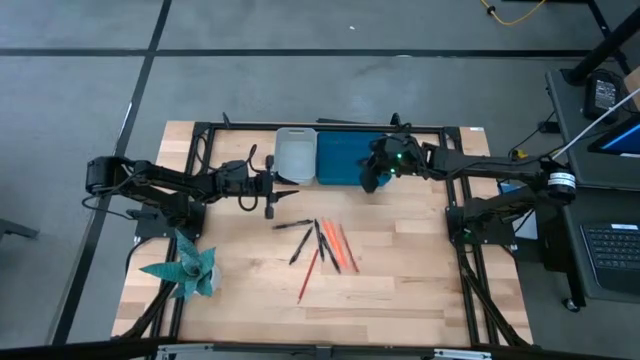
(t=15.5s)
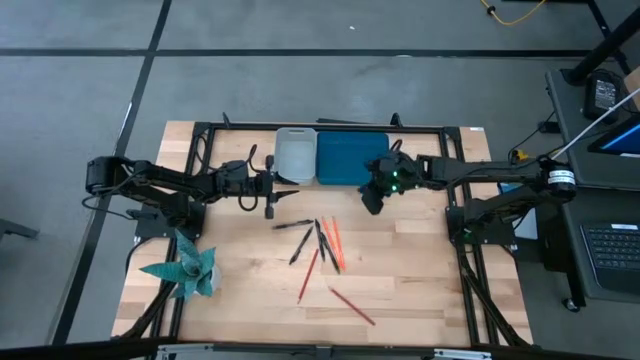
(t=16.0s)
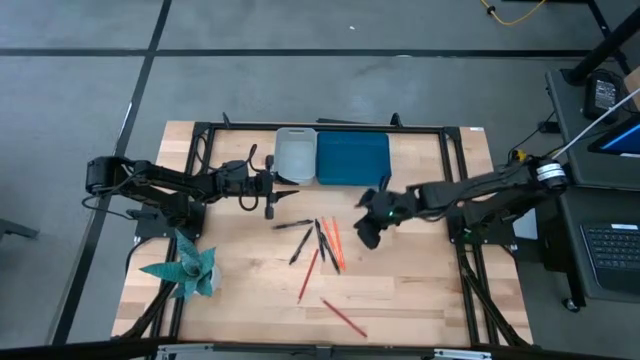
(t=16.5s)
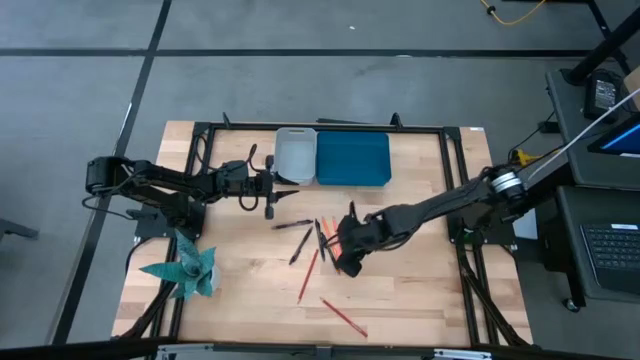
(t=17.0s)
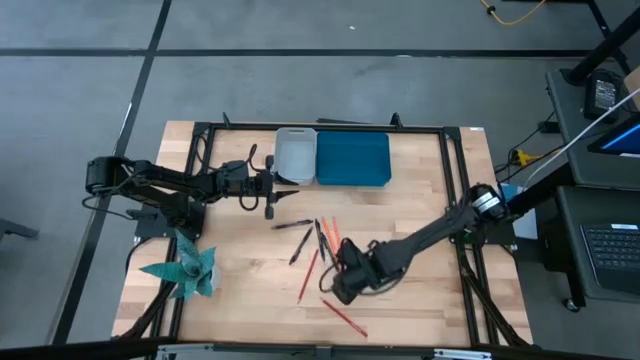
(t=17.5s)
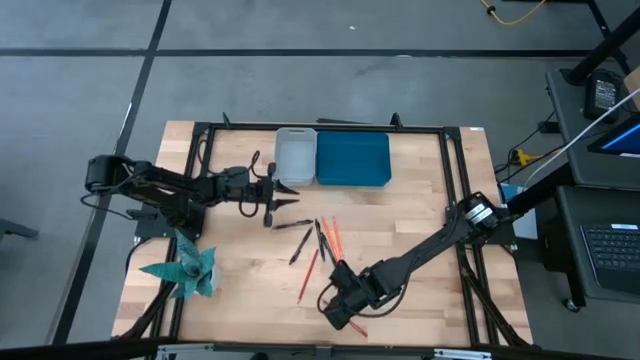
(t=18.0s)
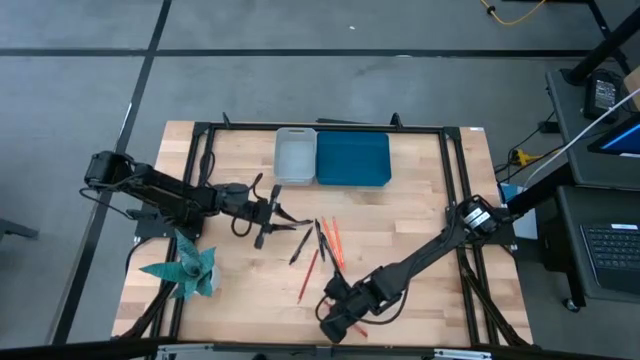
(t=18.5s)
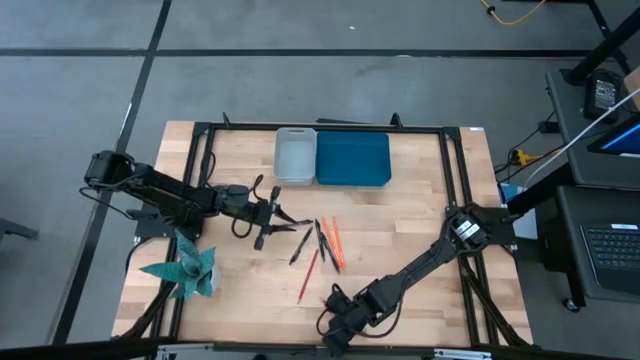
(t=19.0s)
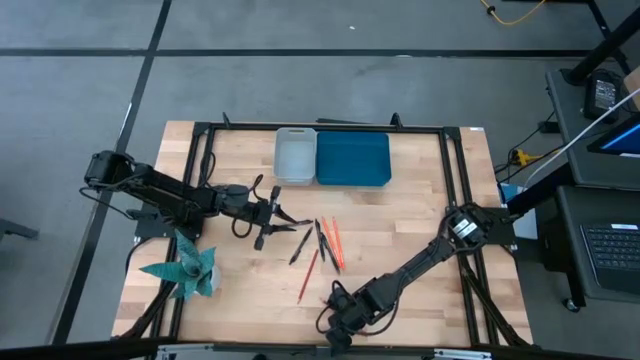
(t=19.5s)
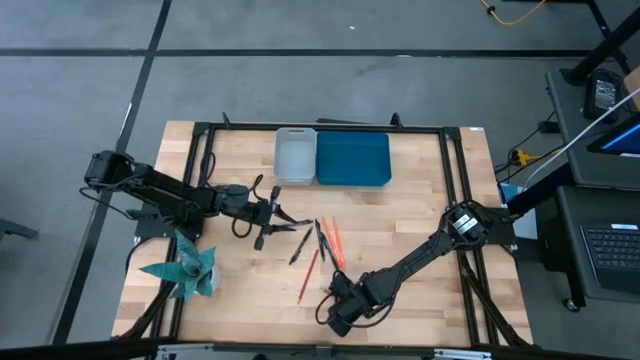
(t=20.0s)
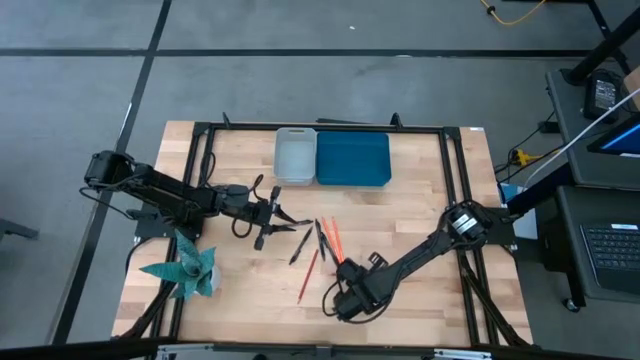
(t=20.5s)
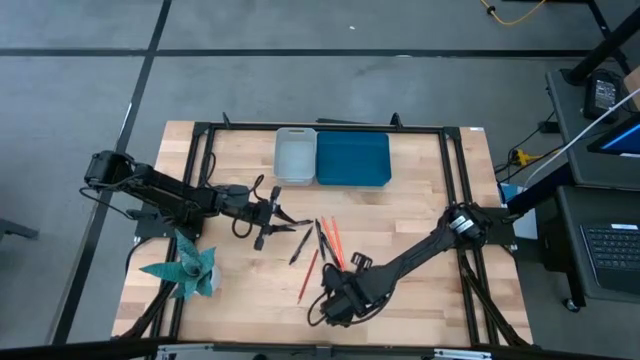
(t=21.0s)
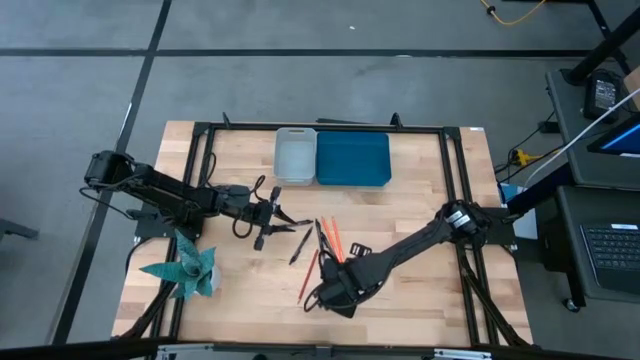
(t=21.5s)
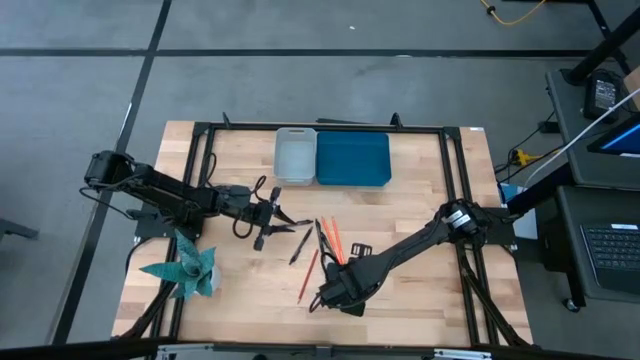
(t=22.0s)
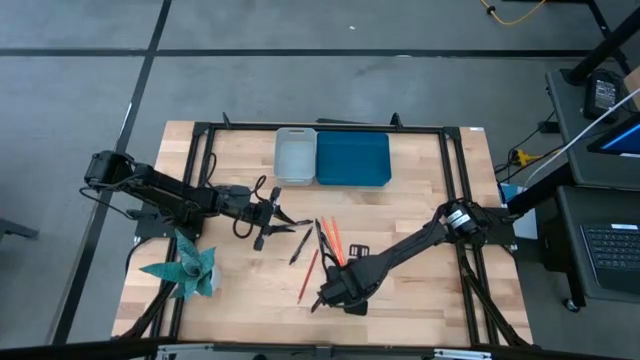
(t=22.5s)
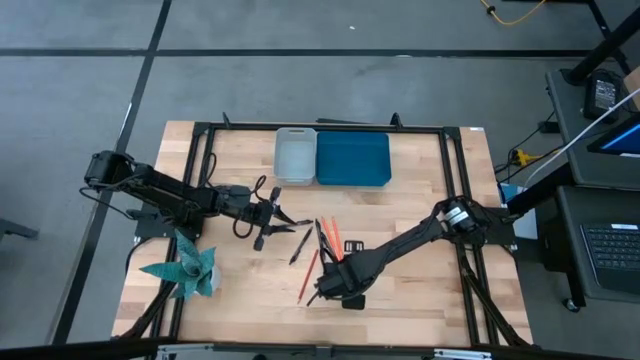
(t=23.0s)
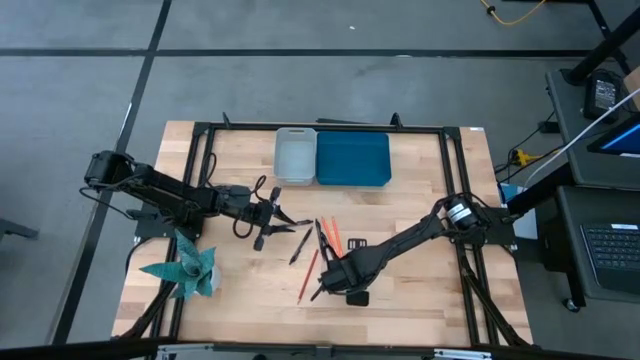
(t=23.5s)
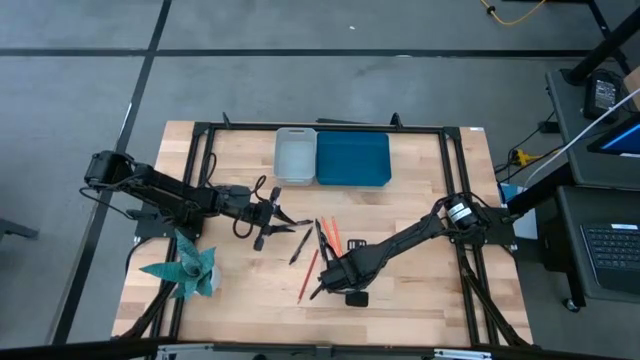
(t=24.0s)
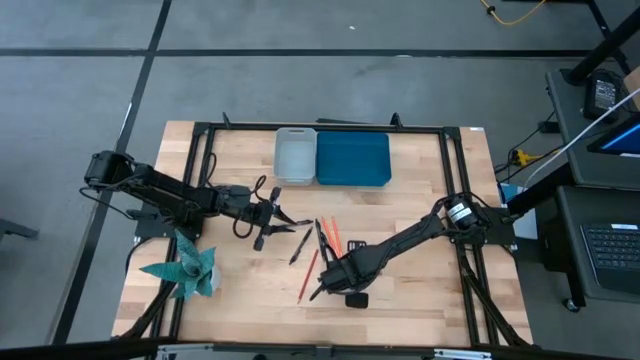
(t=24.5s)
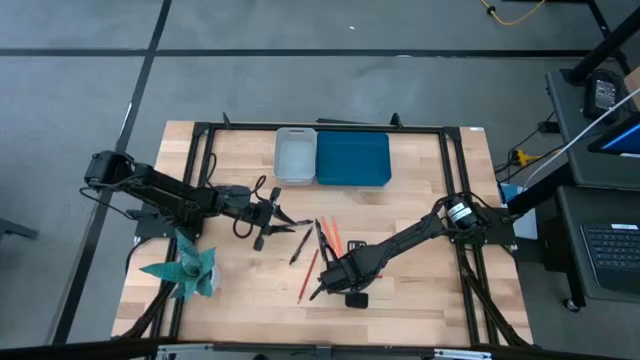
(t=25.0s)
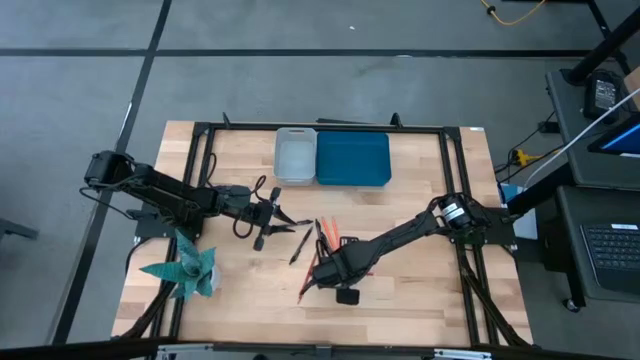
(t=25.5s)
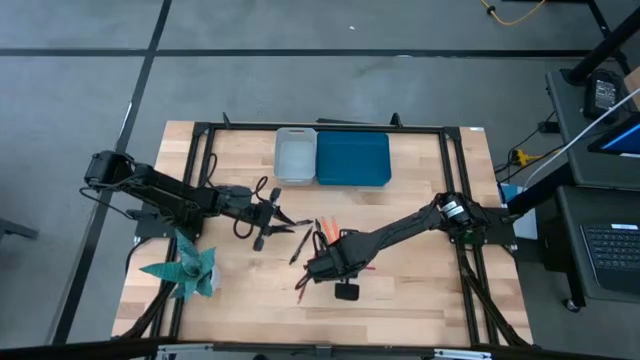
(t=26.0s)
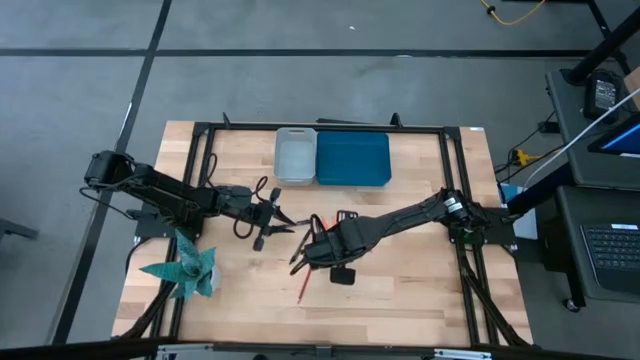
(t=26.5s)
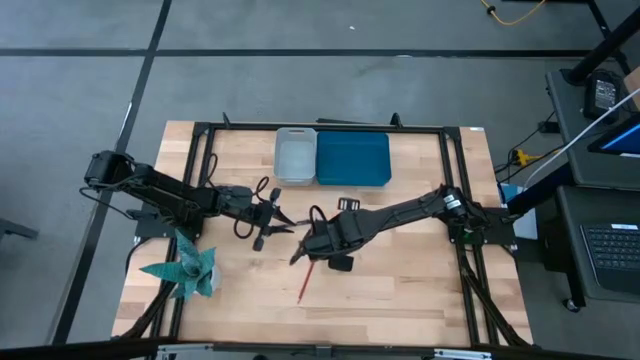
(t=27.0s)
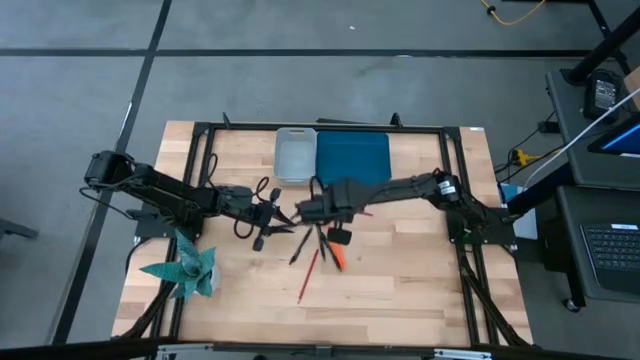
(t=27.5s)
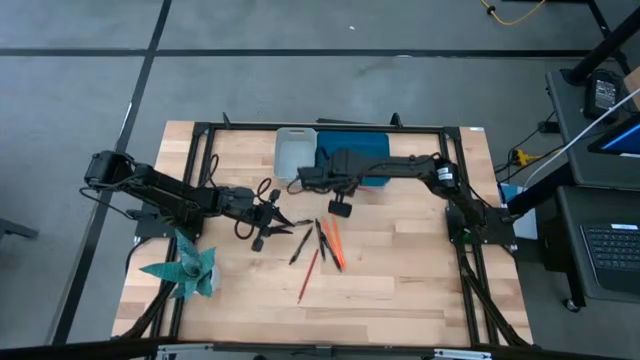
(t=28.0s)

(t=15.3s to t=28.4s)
Task: Sort pens & pencils
Put the top red pencil into the blue bin

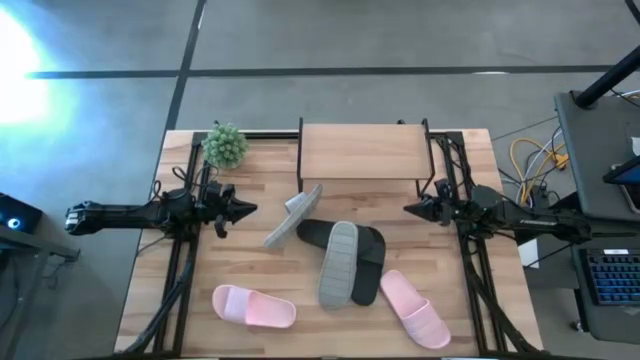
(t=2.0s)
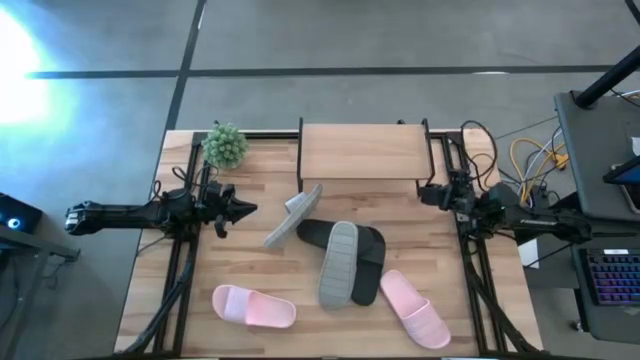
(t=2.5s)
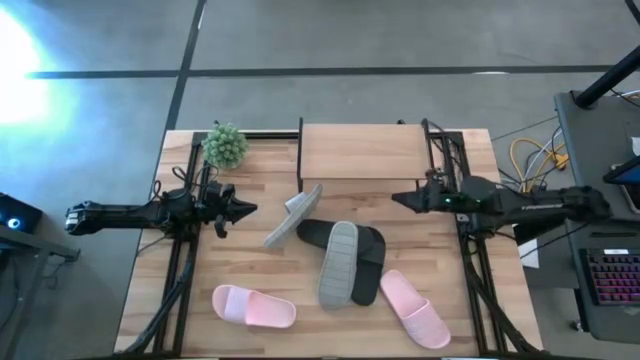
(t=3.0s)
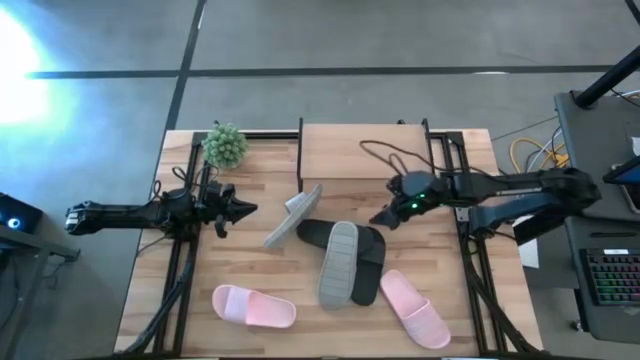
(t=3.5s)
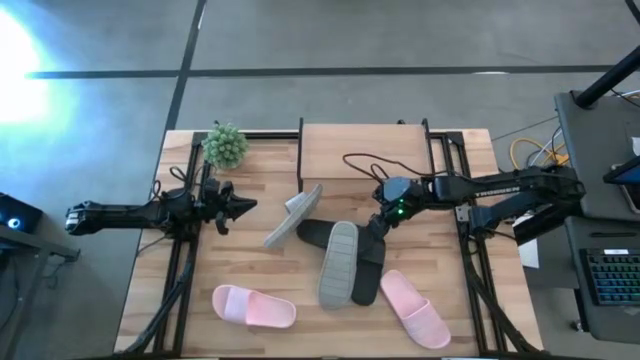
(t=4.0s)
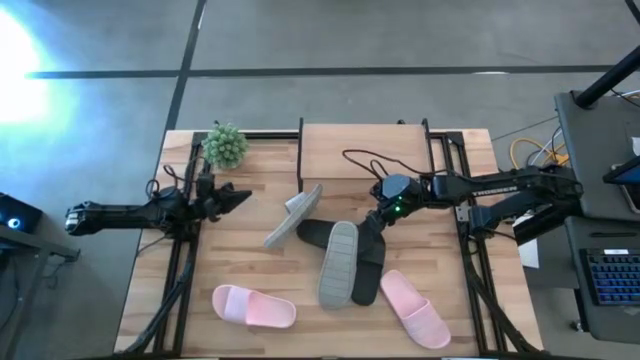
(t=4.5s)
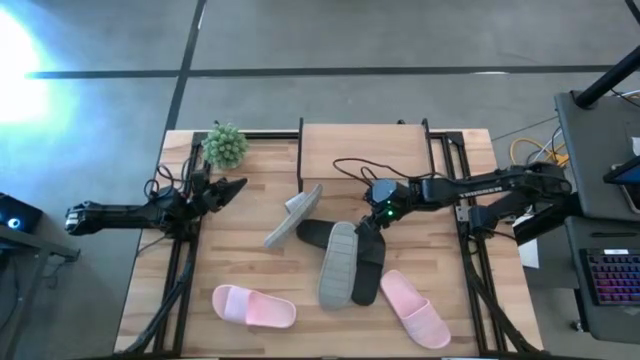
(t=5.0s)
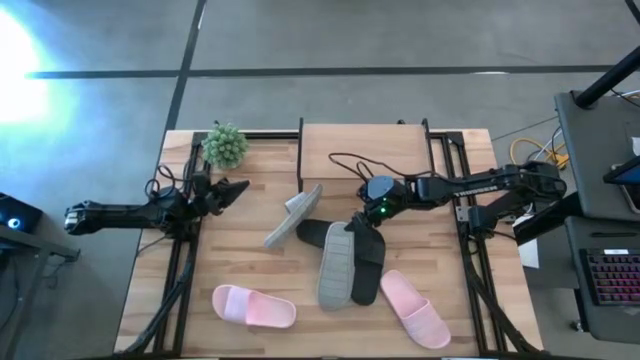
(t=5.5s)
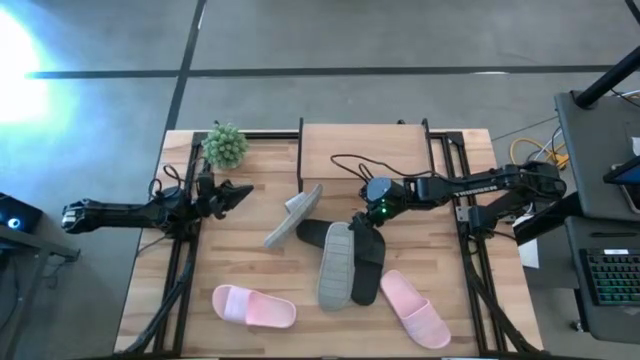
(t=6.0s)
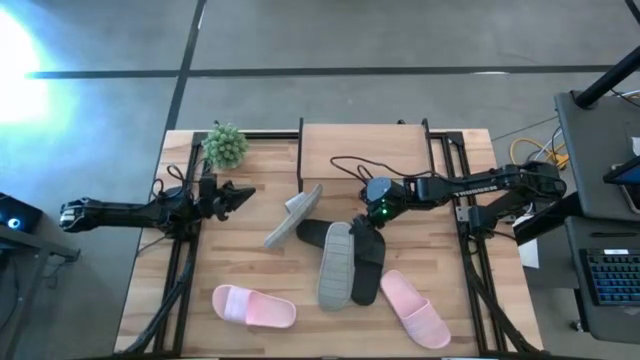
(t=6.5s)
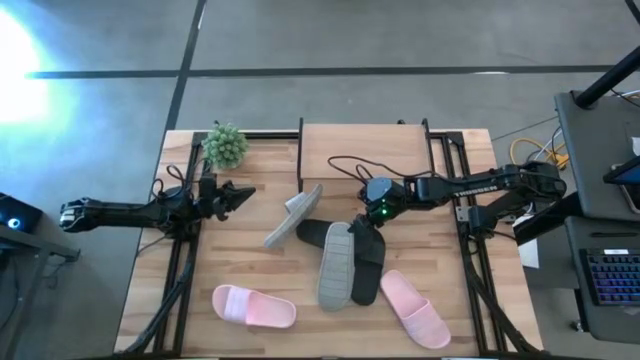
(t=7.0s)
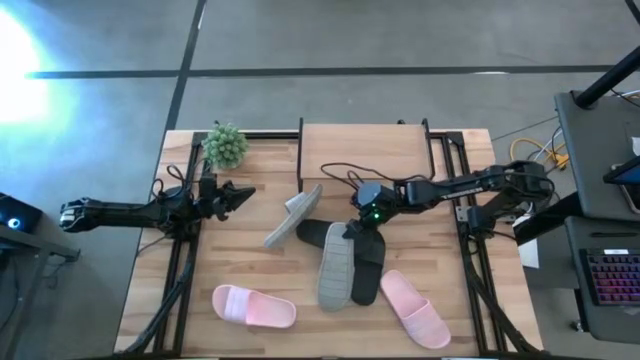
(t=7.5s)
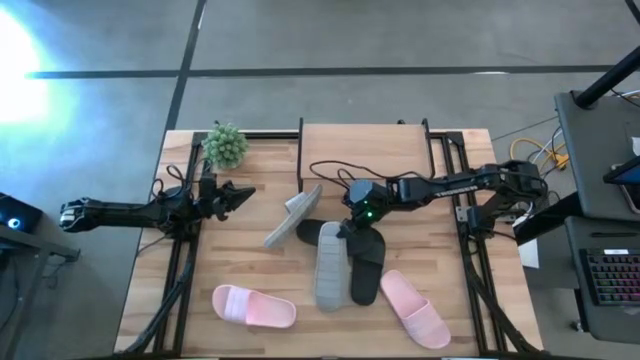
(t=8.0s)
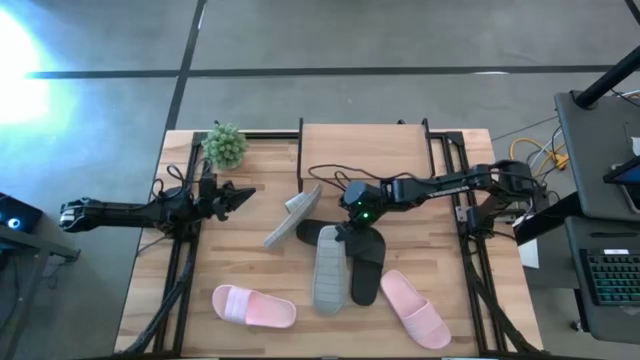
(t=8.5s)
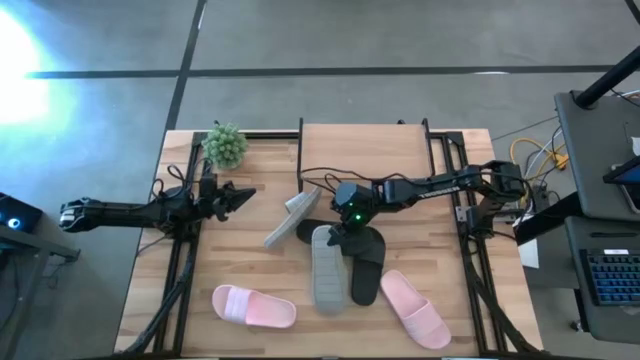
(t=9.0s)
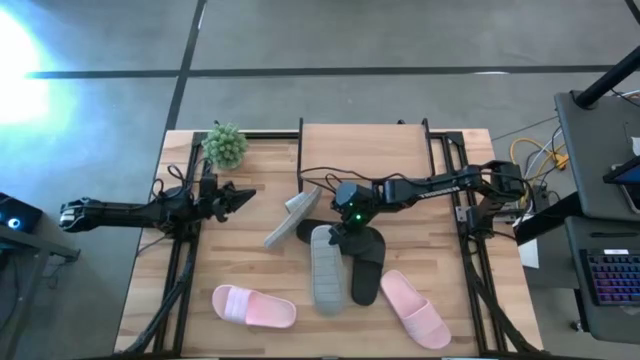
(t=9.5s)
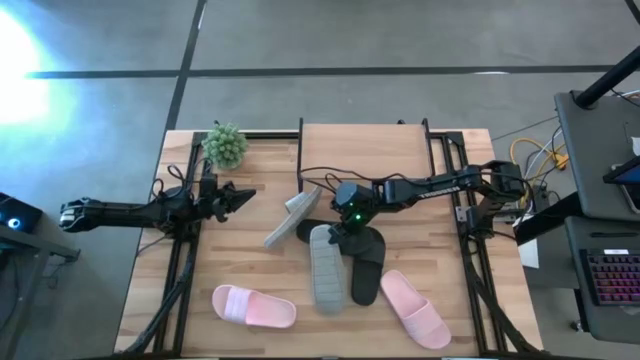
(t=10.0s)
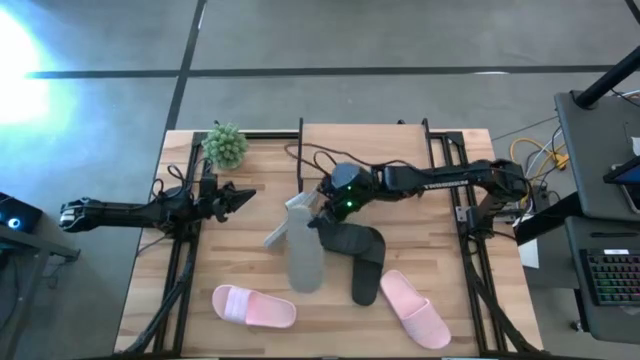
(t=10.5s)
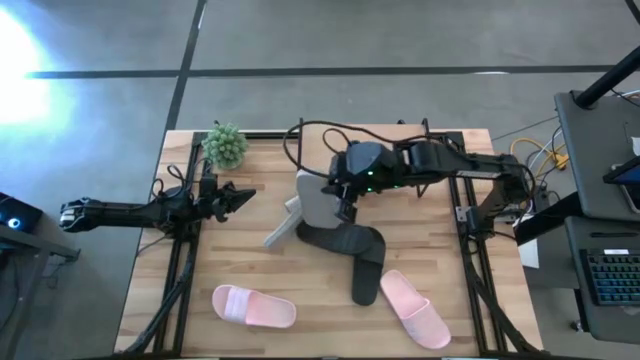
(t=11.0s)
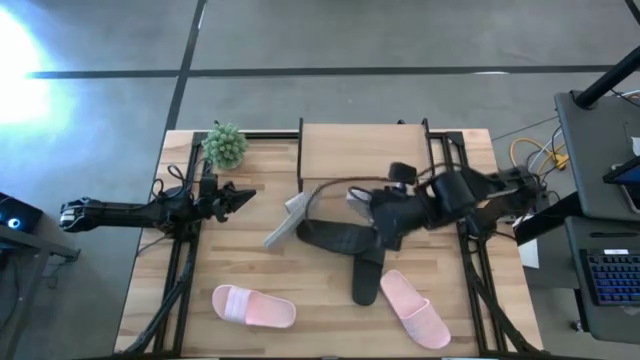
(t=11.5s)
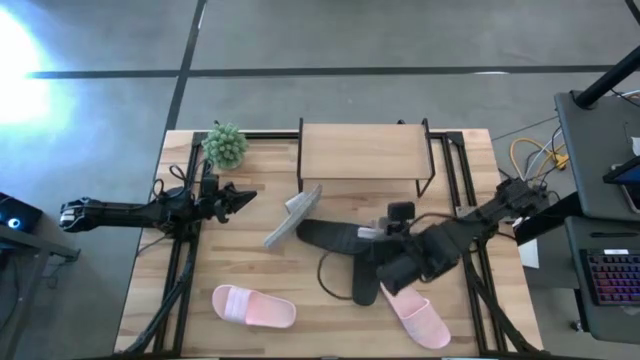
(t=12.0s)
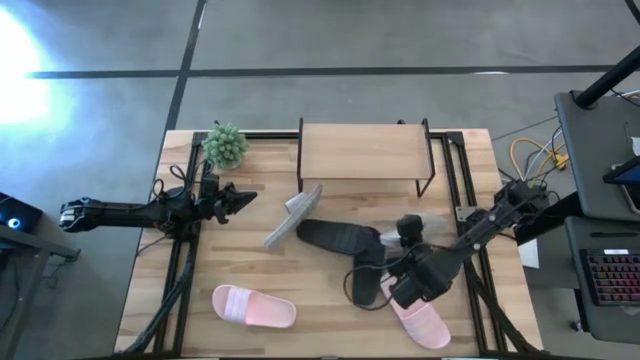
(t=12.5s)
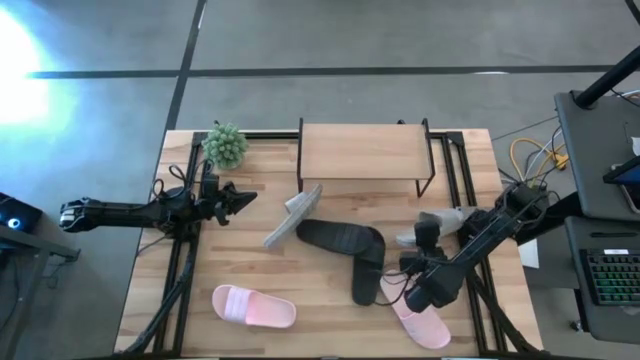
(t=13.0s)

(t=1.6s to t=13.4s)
Task: Pick and place slides into the shelf
Move the right gray slipper to the middle right of the table
